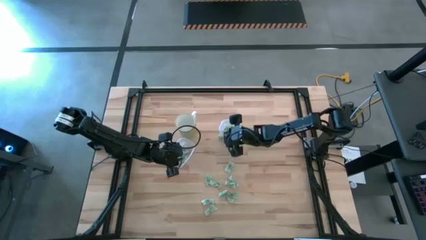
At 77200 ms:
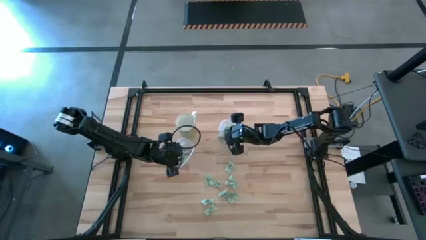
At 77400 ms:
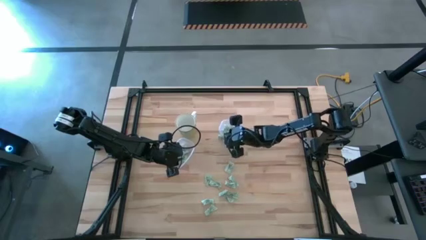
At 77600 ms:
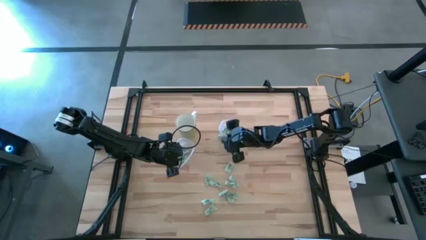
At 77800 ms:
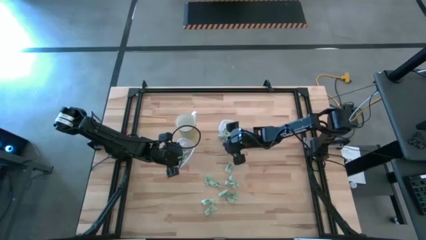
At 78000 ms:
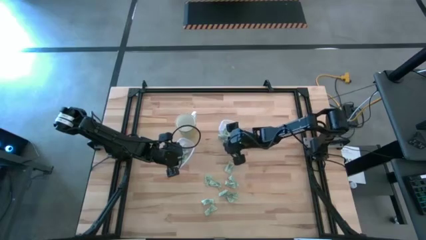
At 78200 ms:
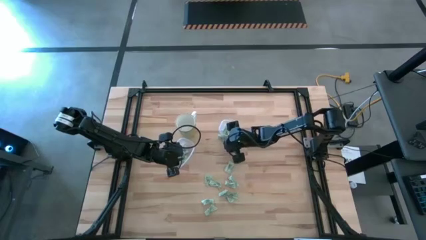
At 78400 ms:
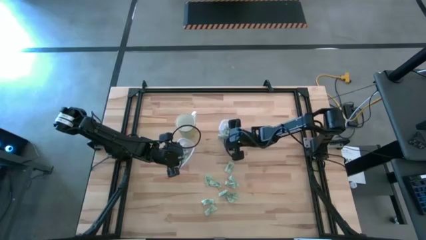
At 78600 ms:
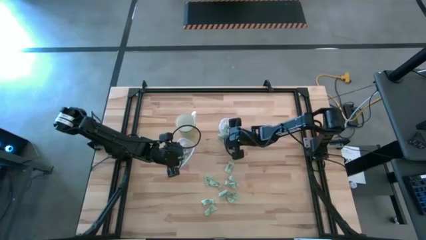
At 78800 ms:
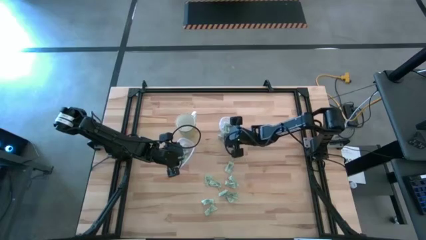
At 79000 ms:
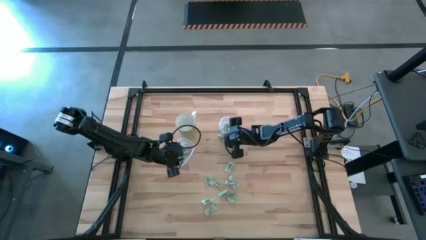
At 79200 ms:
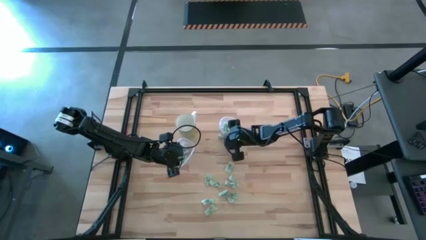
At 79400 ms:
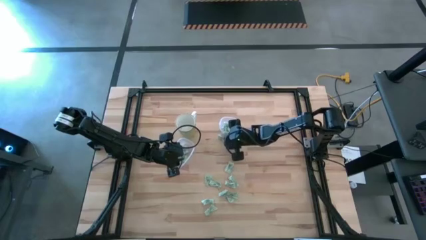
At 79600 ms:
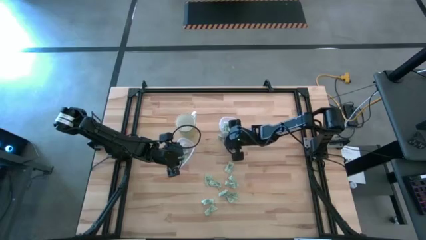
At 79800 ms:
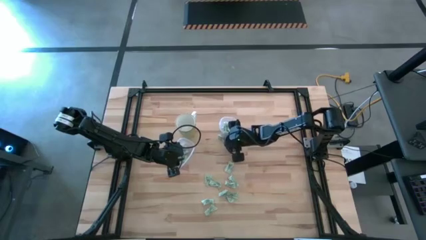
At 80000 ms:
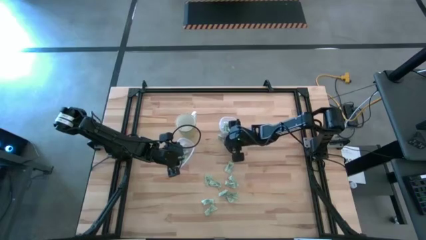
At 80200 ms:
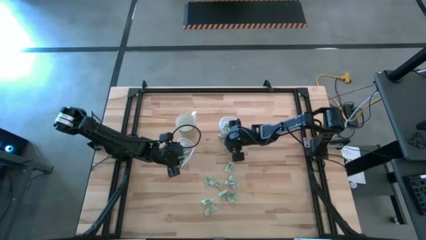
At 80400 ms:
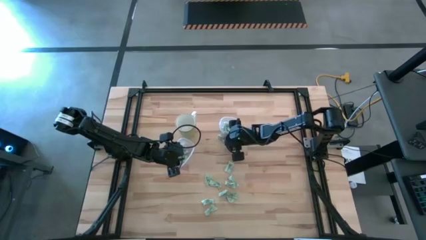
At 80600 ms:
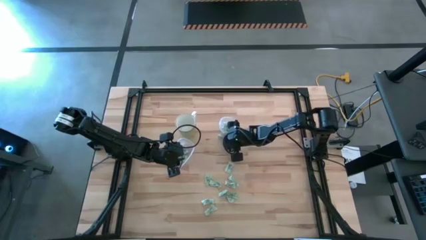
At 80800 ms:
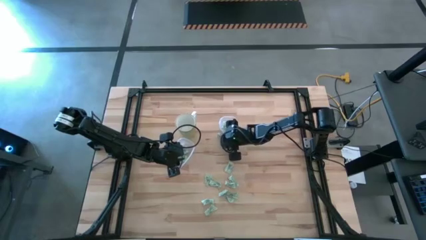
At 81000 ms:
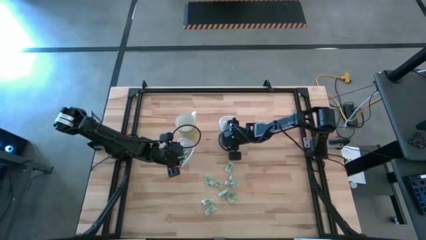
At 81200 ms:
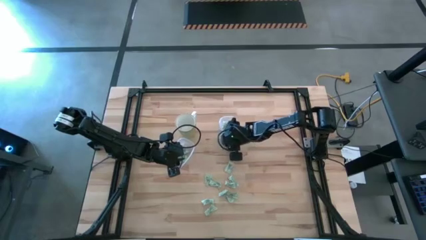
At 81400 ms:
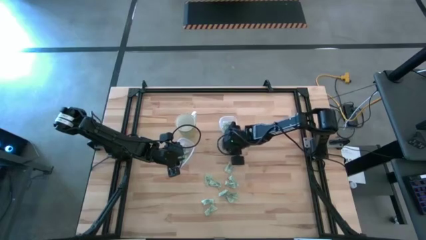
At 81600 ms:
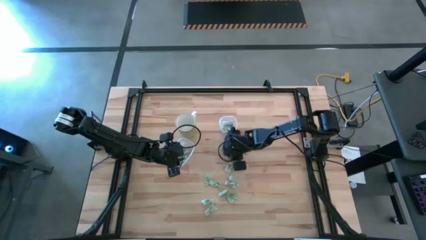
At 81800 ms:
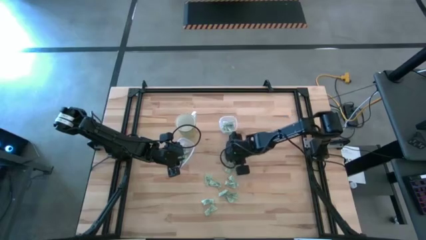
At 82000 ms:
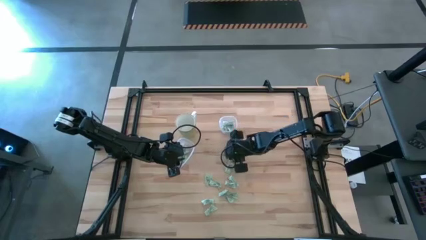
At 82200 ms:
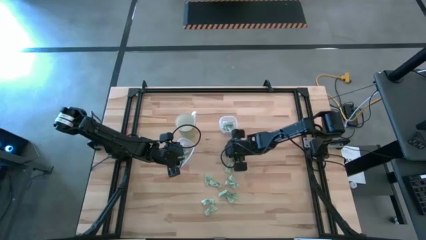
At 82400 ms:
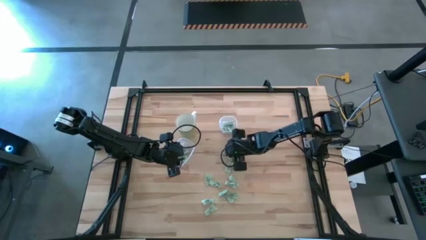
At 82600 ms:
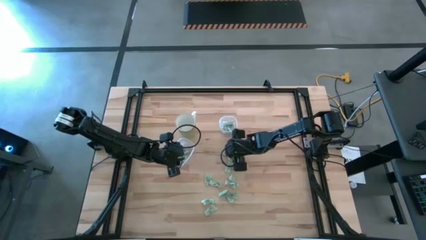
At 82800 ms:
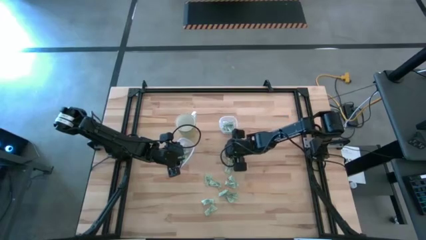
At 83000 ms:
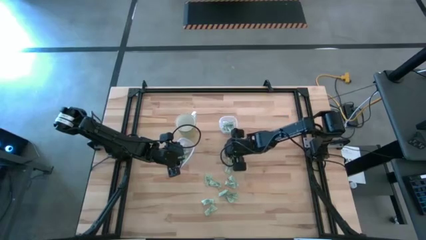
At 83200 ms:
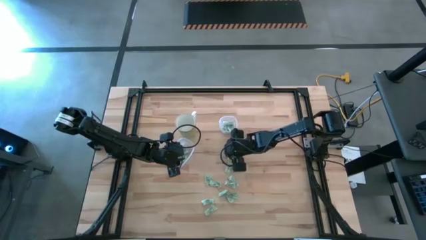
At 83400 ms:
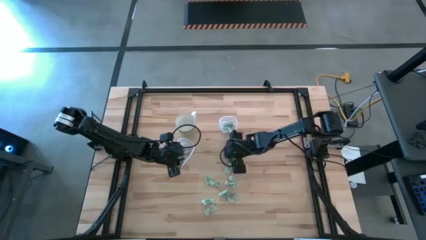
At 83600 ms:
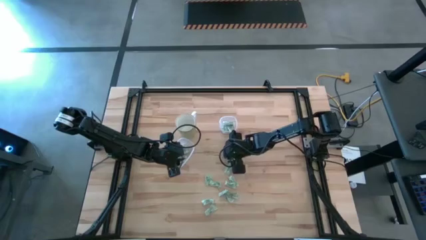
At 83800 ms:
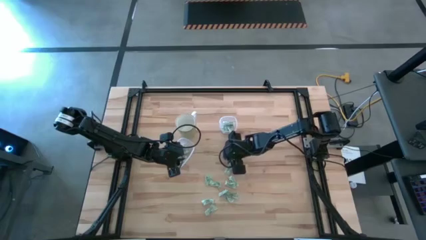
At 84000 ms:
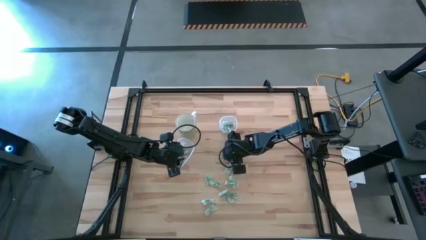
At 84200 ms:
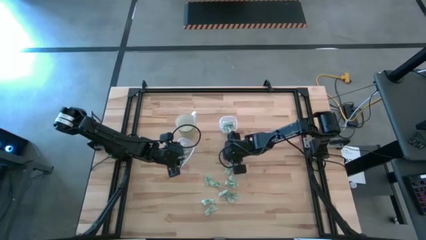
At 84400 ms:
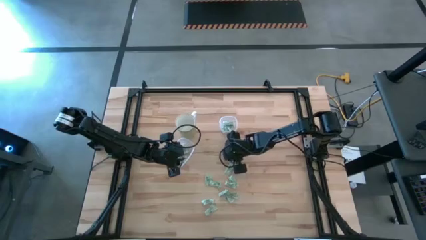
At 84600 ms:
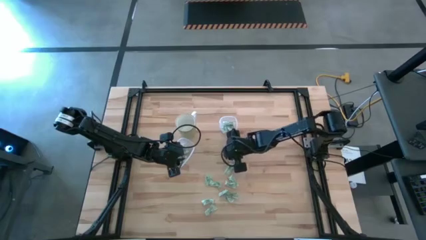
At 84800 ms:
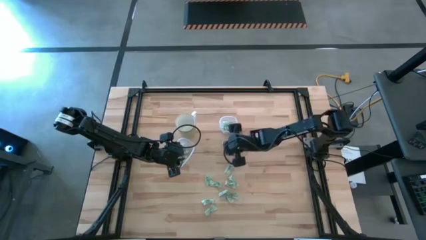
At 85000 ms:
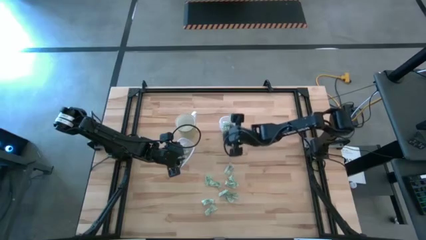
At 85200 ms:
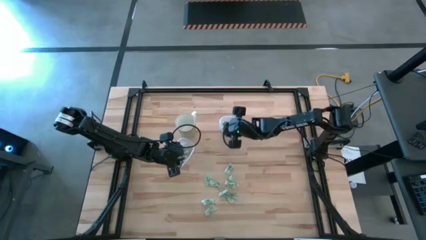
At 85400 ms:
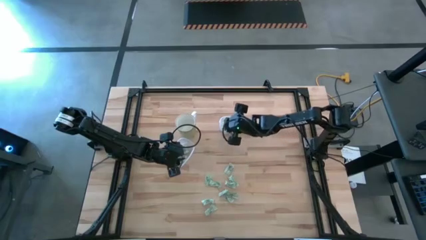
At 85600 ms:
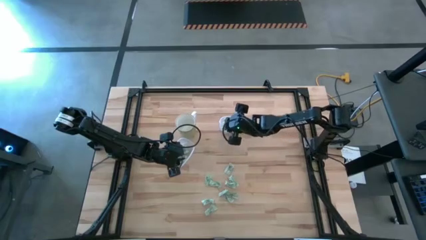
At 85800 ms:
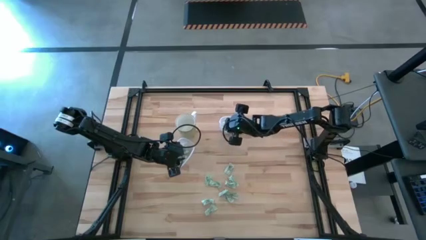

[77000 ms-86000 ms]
Task: Pick and place items into bin
Put the stevia packet into the top transparent bin

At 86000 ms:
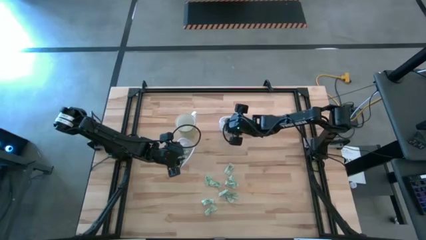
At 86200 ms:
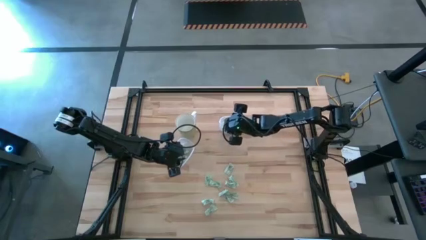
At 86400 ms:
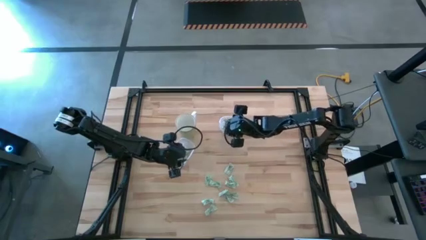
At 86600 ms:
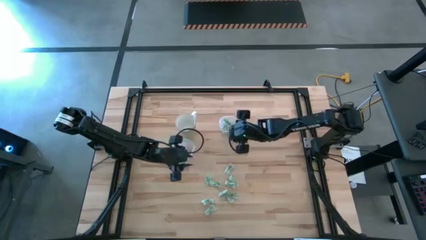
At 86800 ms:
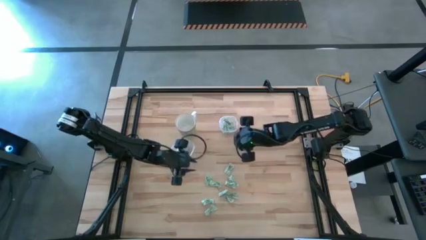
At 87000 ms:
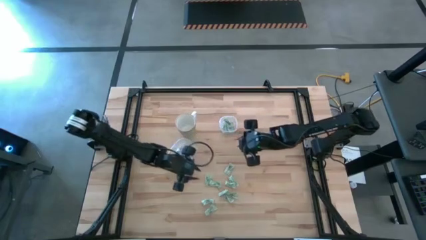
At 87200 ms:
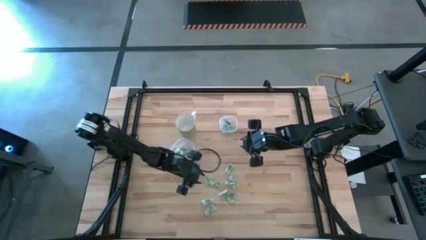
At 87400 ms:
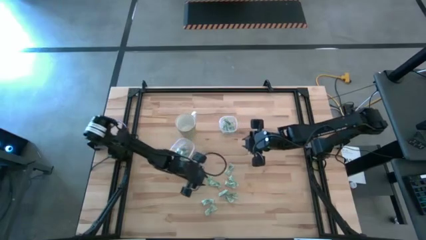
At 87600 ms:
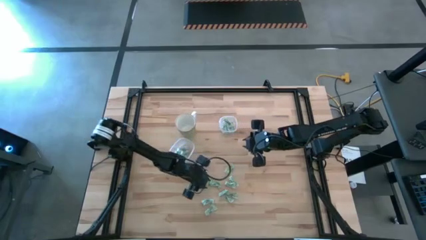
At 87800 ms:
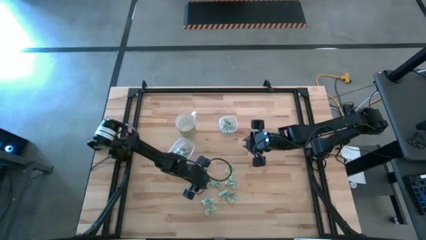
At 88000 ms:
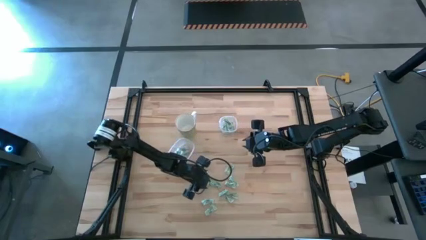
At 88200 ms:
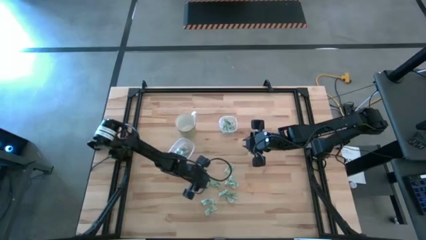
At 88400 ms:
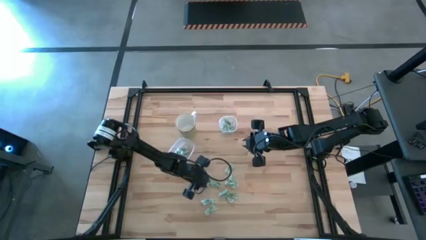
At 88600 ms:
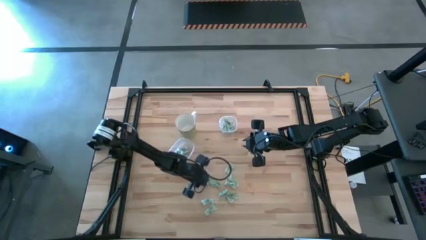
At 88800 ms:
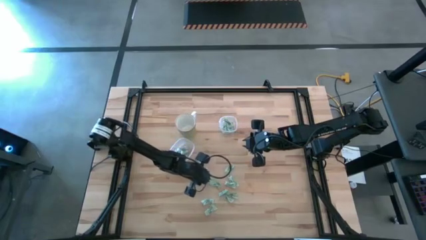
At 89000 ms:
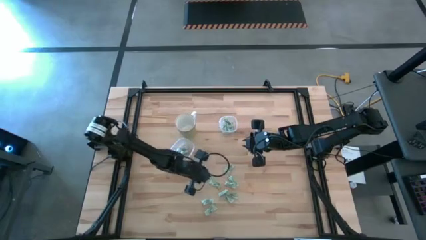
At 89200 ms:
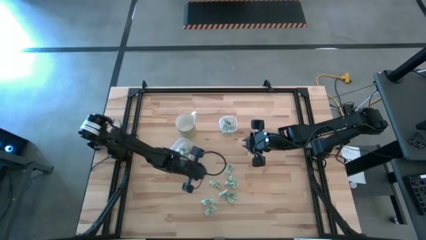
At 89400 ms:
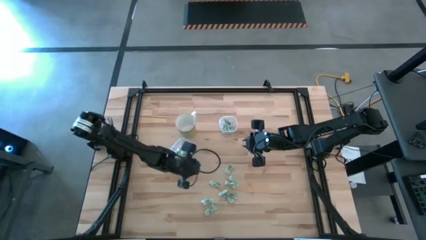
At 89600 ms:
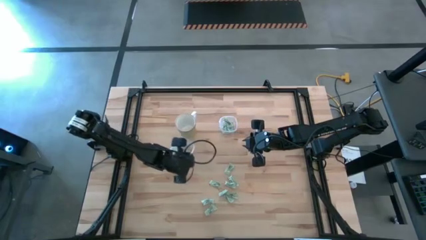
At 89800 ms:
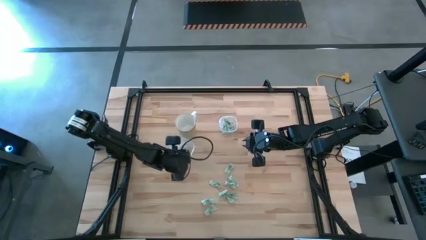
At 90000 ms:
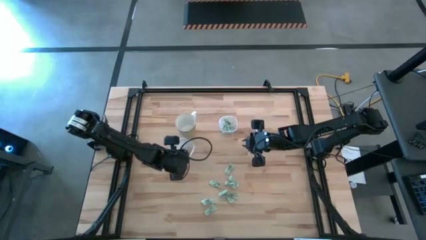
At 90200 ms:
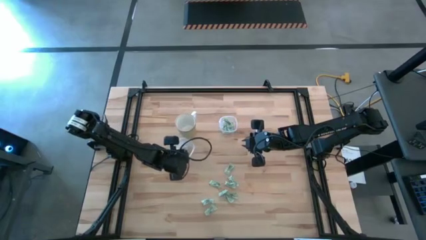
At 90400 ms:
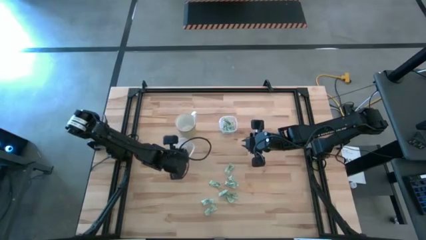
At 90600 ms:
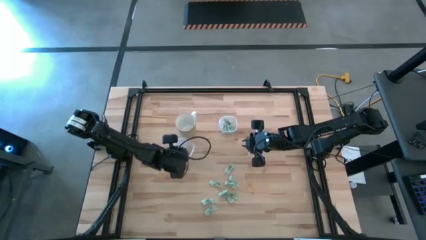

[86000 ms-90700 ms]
Put the stevia packet into the bottom transparent bin

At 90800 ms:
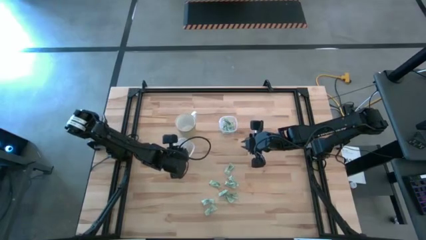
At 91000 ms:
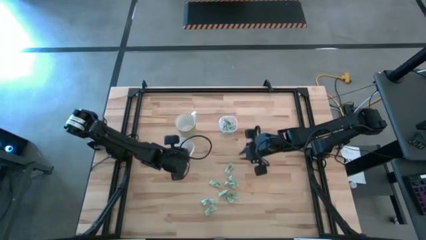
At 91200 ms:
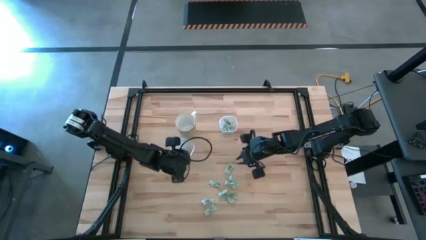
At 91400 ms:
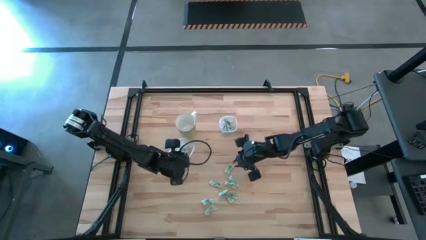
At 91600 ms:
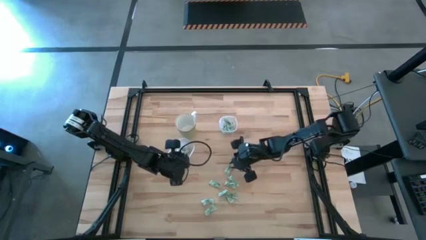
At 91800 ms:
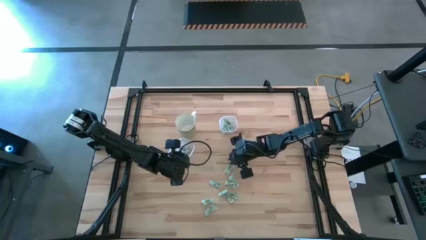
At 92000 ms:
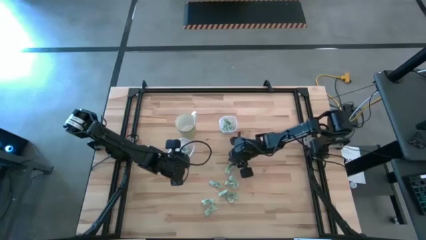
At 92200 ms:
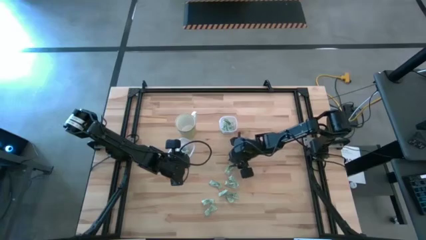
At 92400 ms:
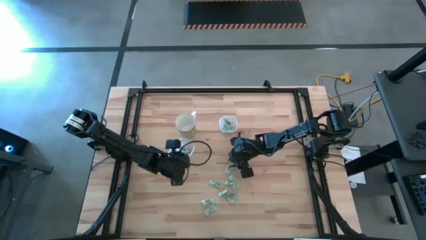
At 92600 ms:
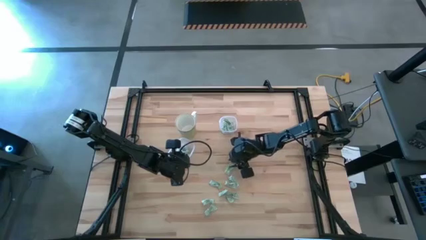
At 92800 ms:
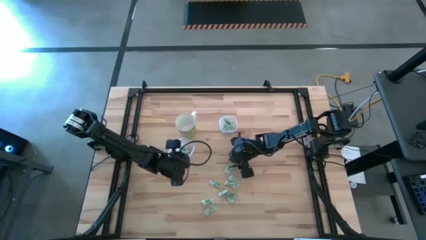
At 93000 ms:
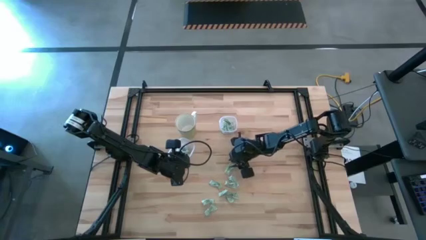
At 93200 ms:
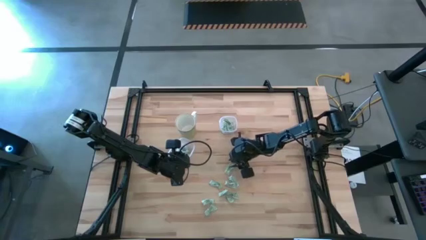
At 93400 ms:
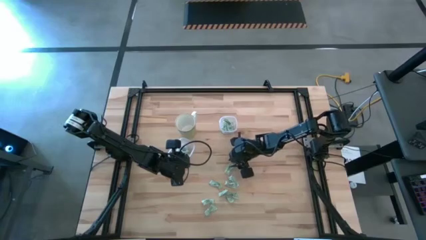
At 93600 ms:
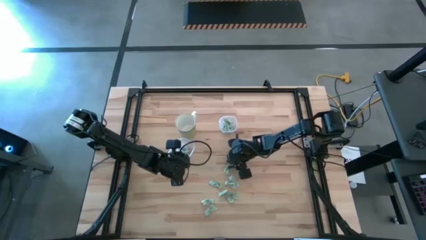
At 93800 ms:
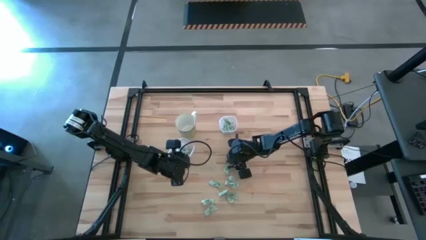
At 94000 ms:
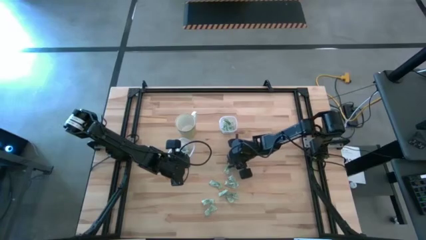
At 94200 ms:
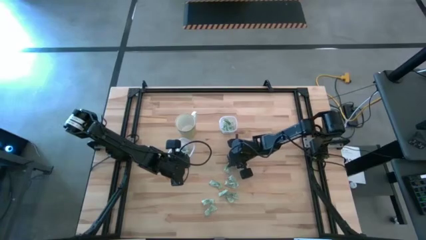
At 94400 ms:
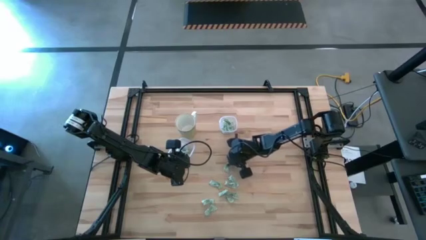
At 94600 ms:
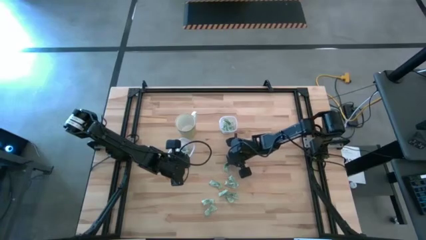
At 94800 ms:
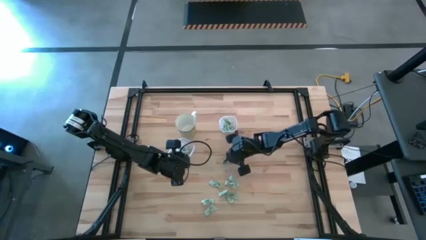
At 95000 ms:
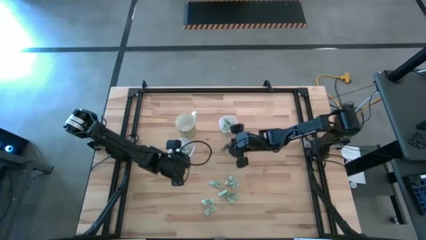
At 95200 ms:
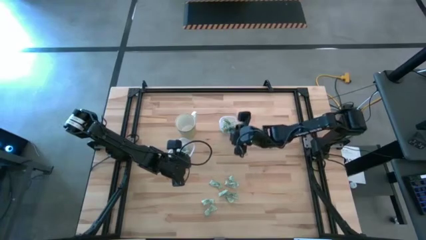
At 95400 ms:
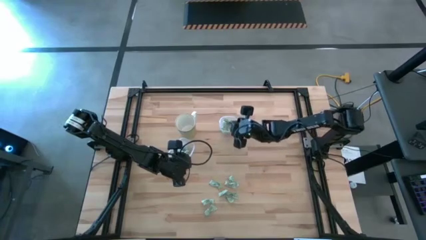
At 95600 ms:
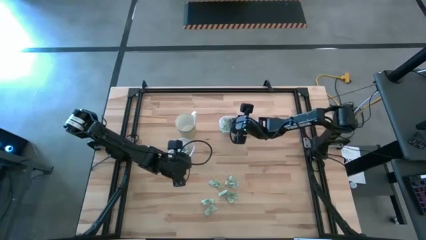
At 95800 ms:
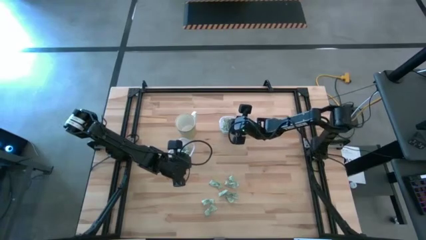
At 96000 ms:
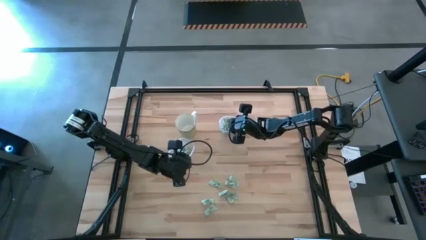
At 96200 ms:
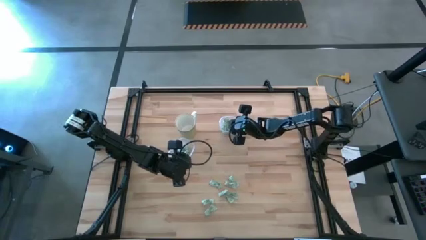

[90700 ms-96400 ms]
Put the stevia packet into the top transparent bin
